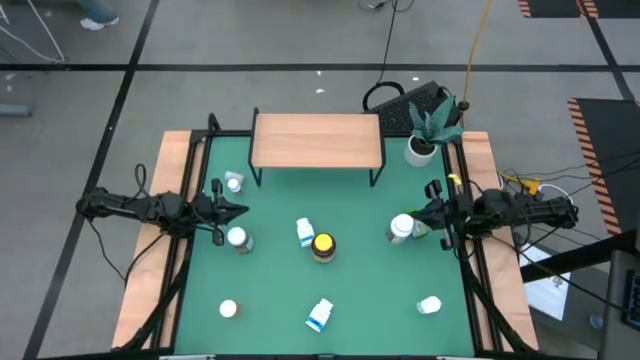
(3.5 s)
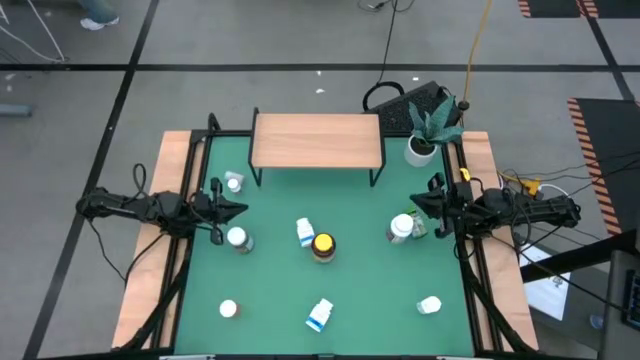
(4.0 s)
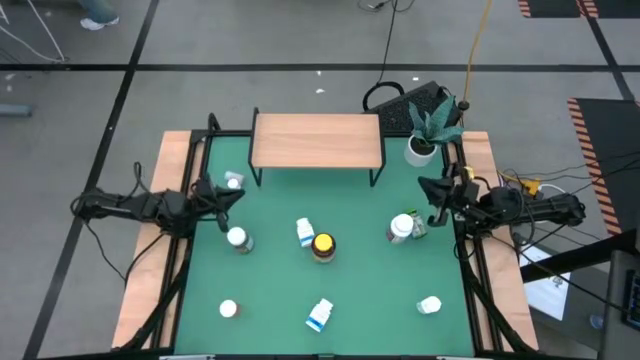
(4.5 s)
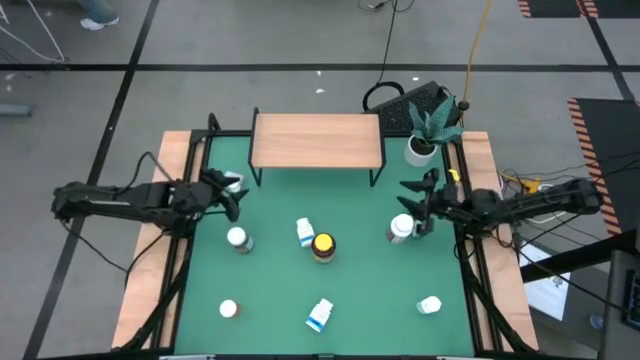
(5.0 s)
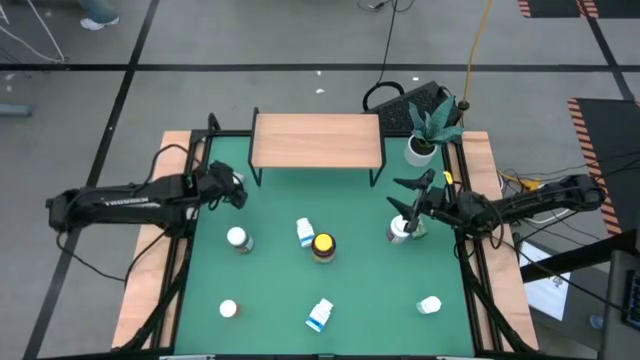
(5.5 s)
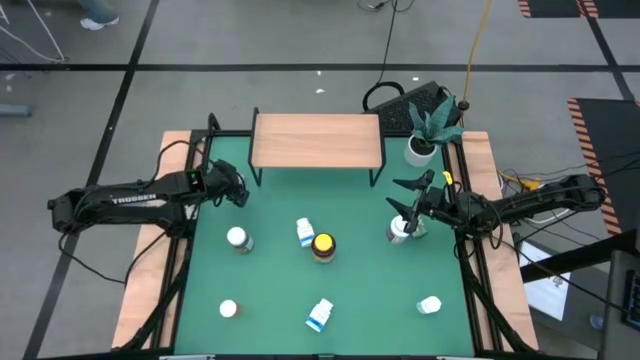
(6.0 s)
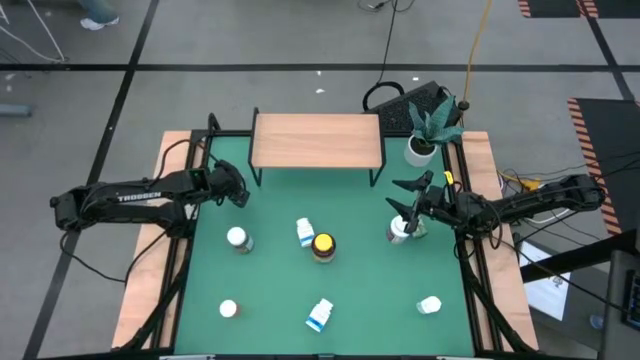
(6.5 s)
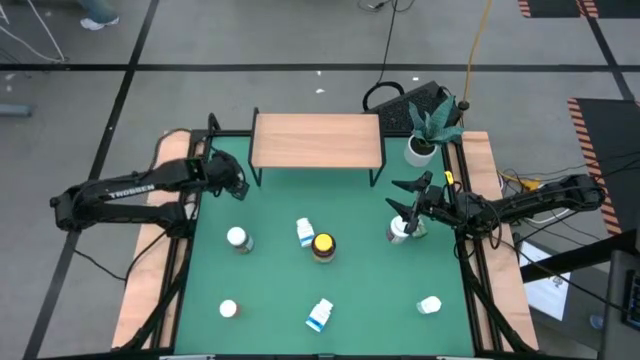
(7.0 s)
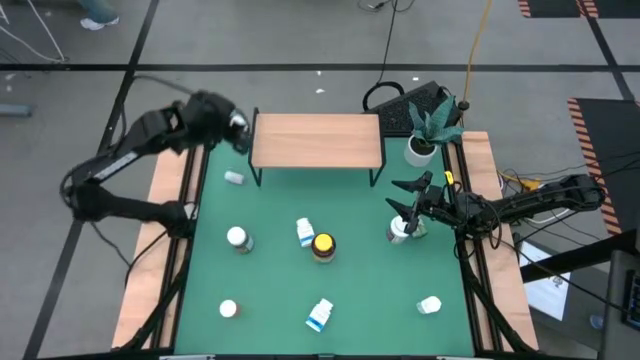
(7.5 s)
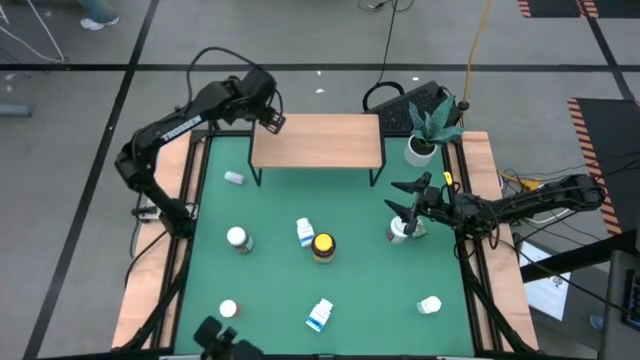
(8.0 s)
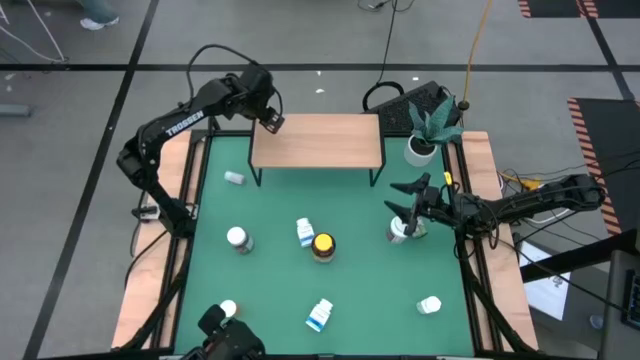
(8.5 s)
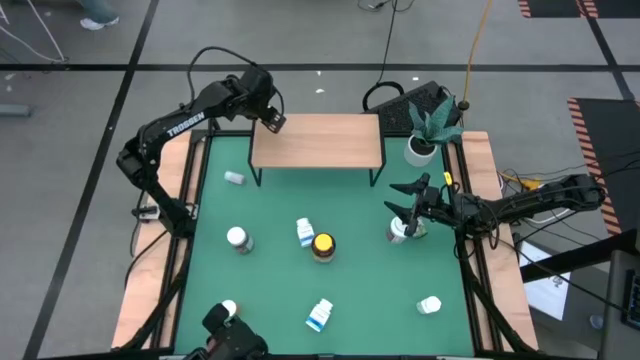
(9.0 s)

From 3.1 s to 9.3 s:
Task: Pick and place medicine bottles onto shelf by color
Put the small white medicine bottle on the shelf

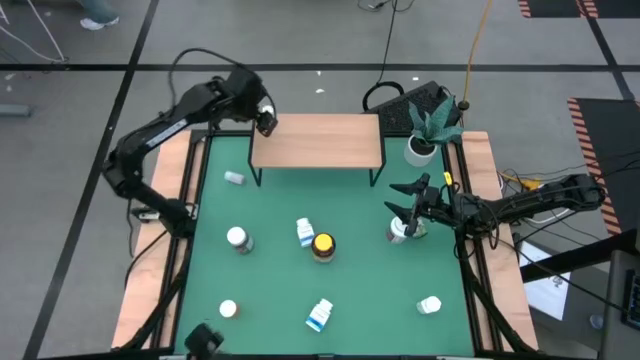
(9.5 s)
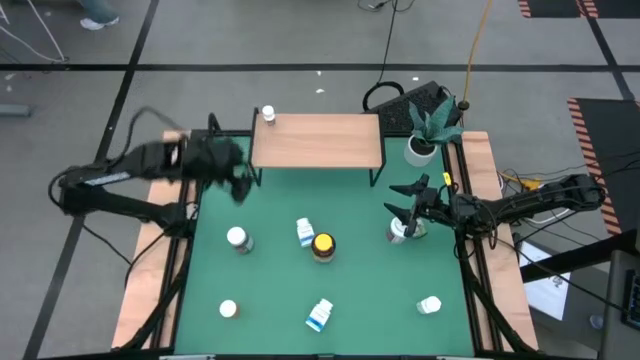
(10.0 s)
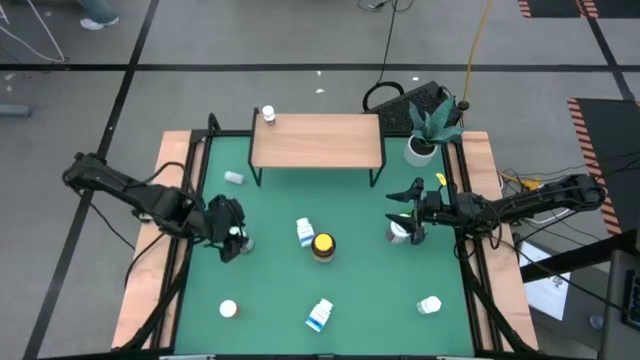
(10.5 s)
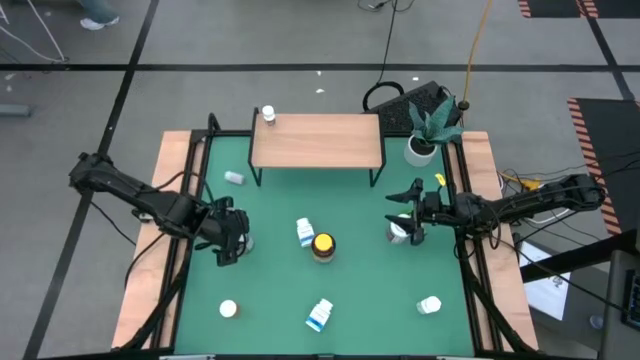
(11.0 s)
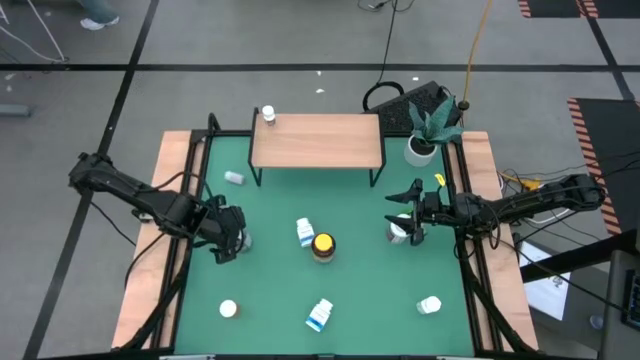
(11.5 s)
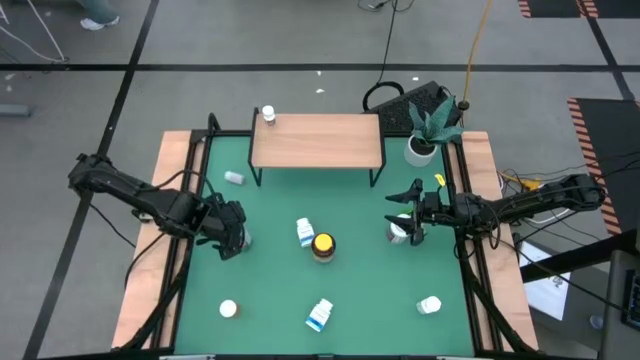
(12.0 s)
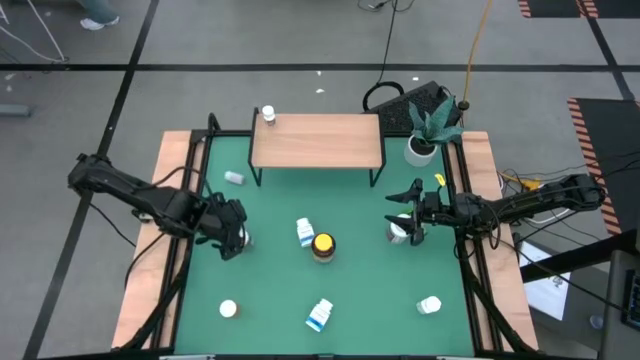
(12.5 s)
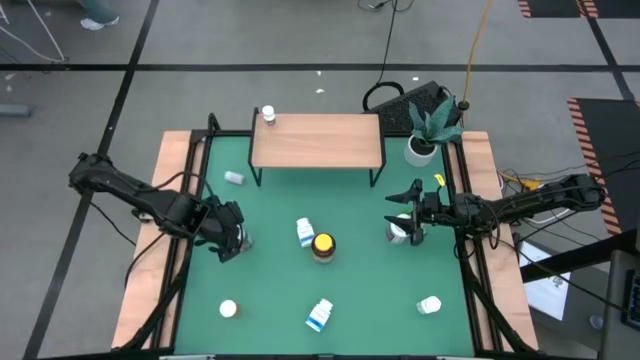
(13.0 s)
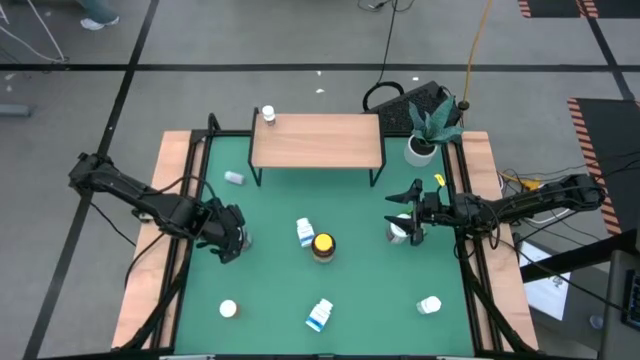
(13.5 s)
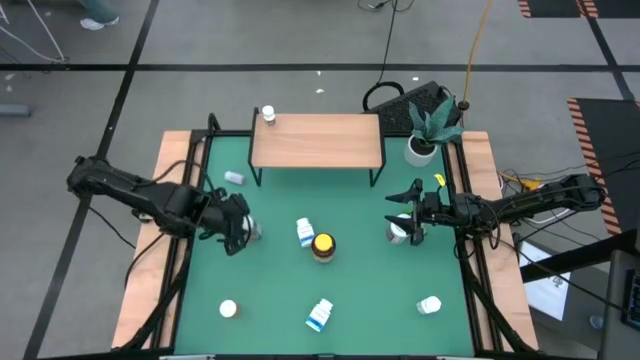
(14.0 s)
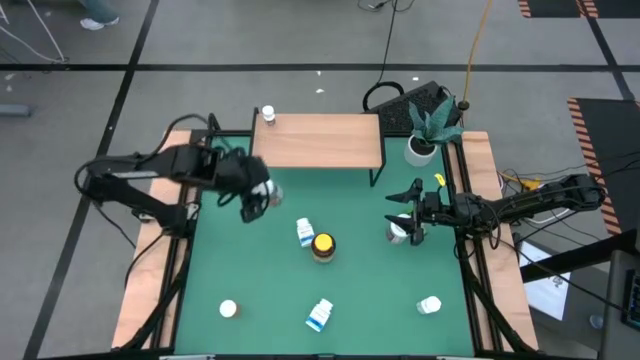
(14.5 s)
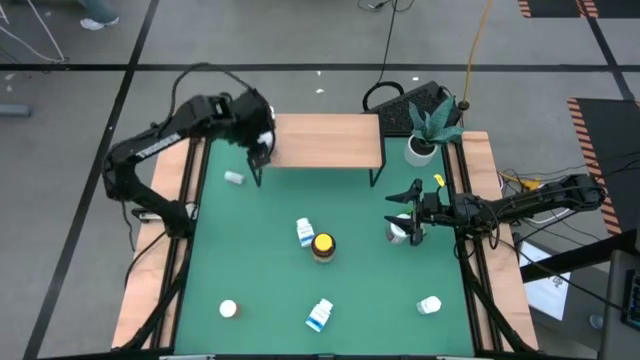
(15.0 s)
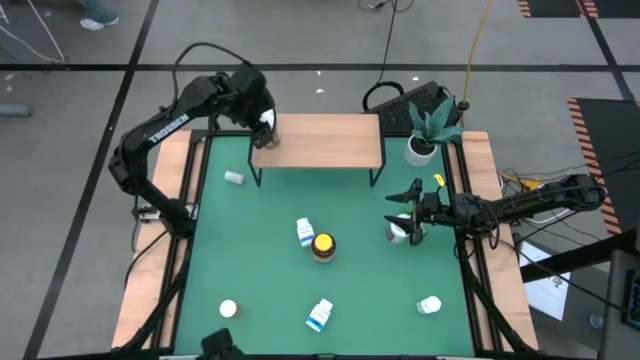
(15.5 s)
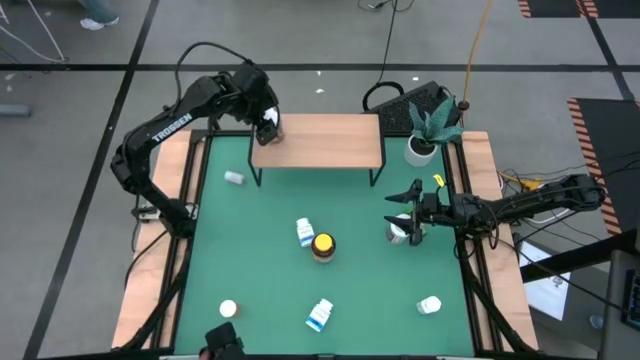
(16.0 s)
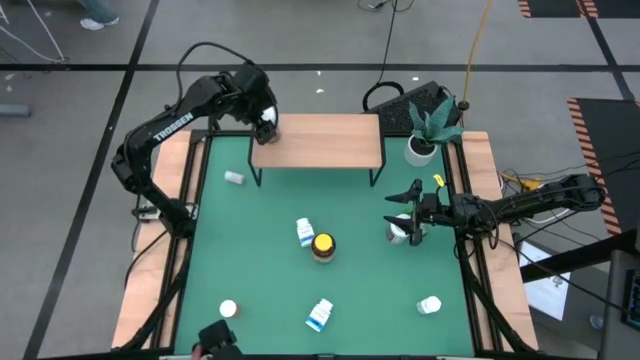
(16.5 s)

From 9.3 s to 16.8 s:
Put the left green medicine bottle on the shelf

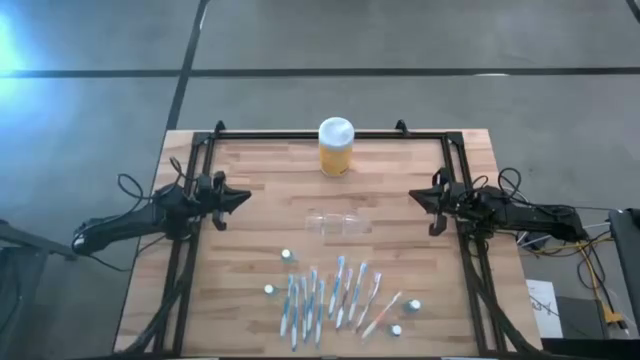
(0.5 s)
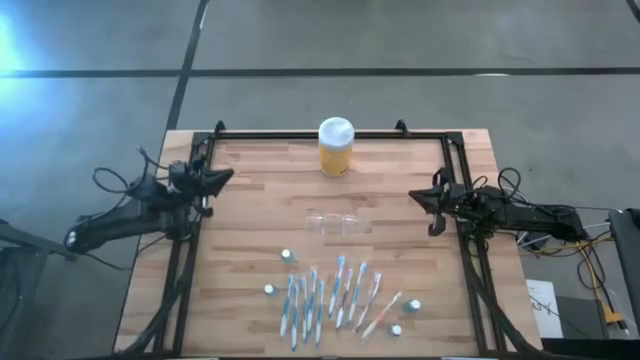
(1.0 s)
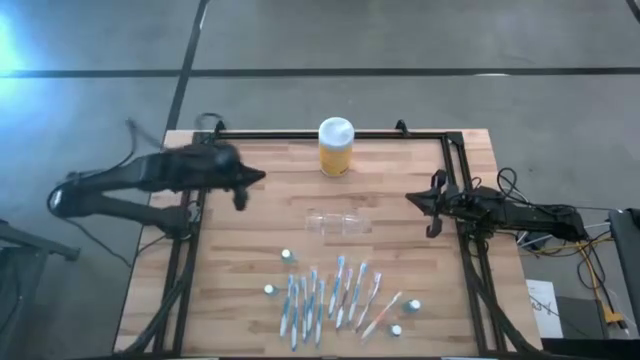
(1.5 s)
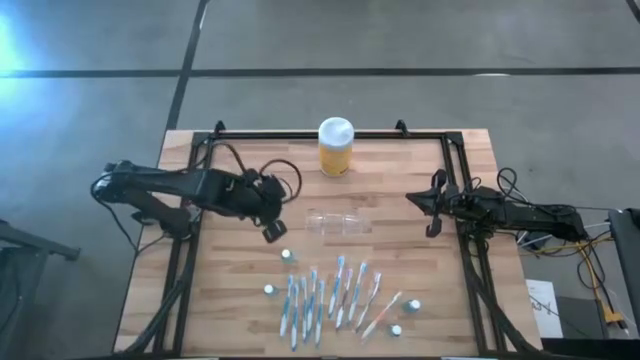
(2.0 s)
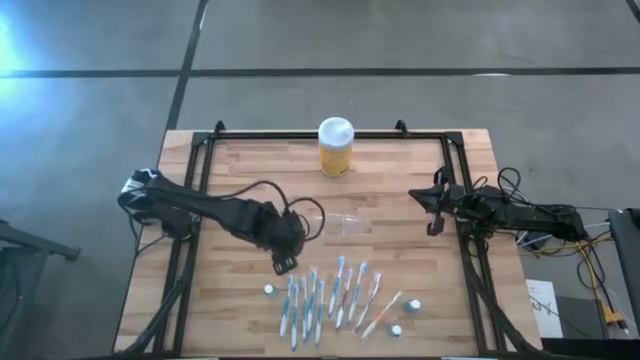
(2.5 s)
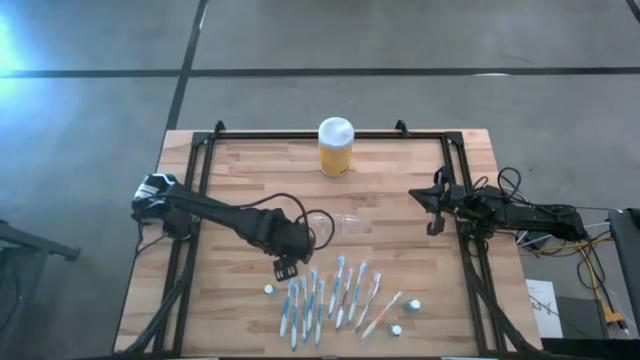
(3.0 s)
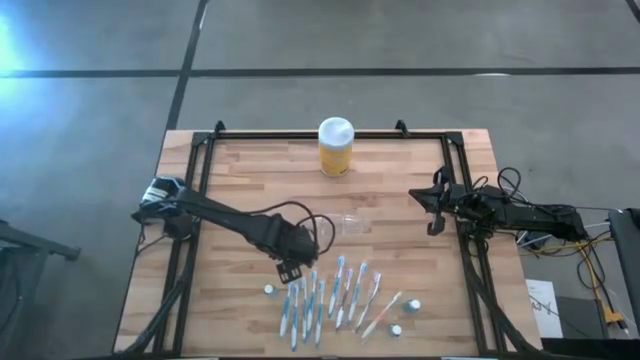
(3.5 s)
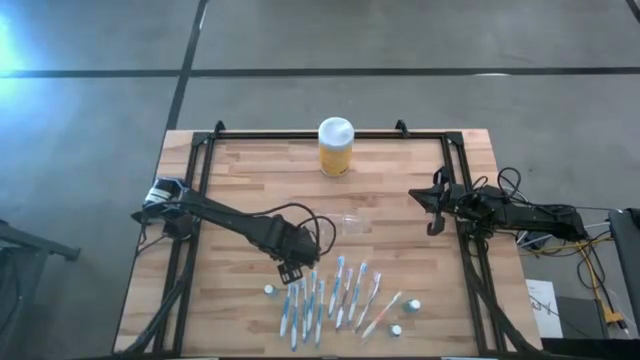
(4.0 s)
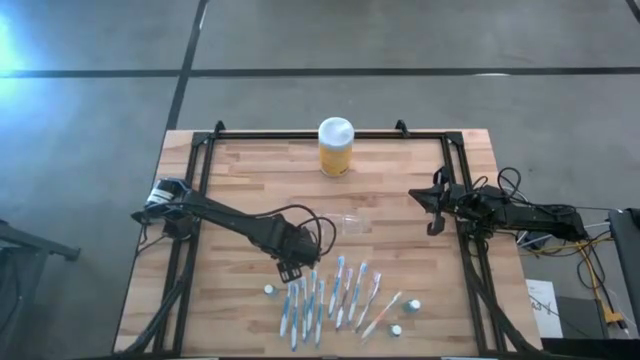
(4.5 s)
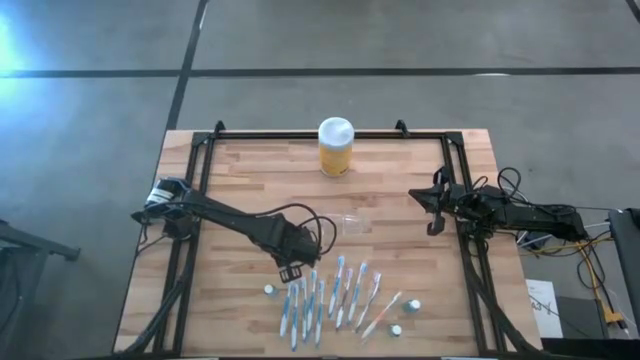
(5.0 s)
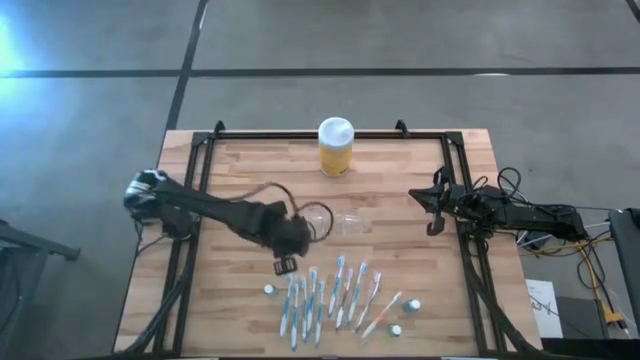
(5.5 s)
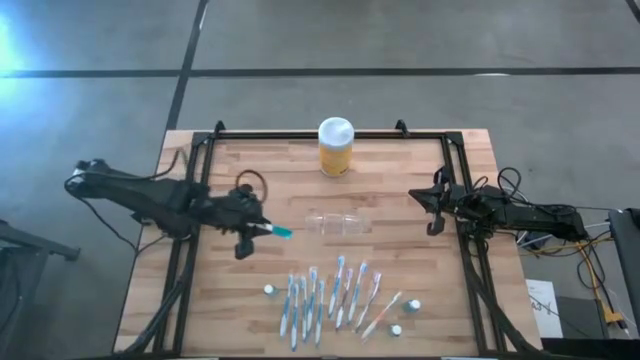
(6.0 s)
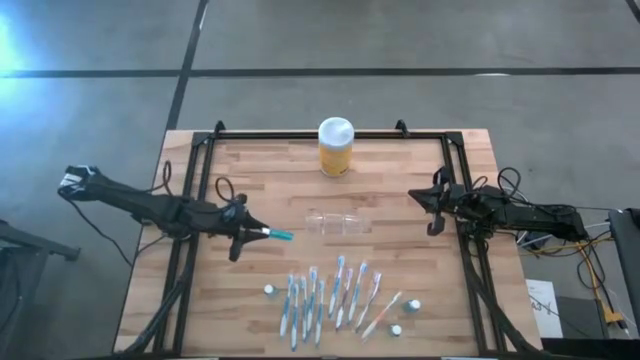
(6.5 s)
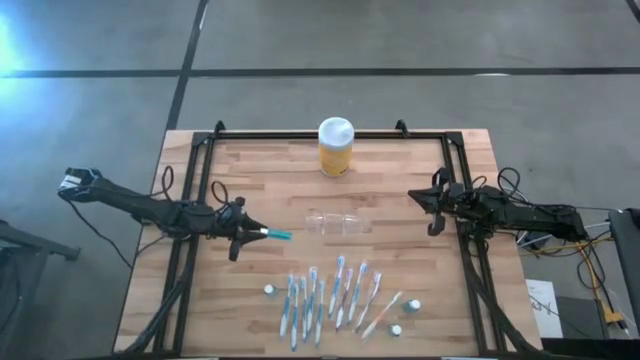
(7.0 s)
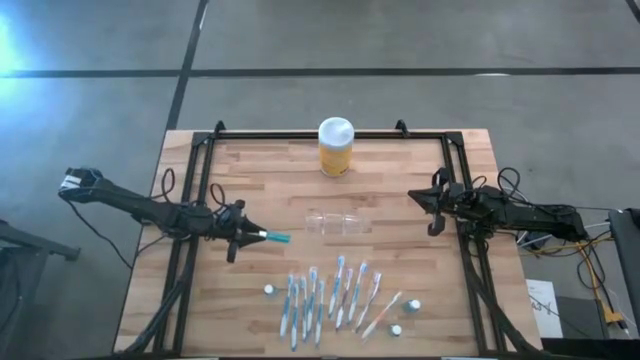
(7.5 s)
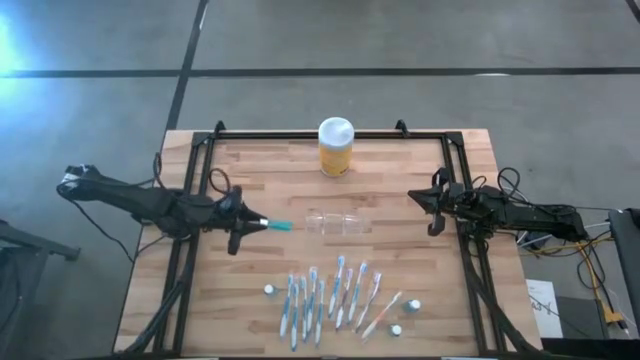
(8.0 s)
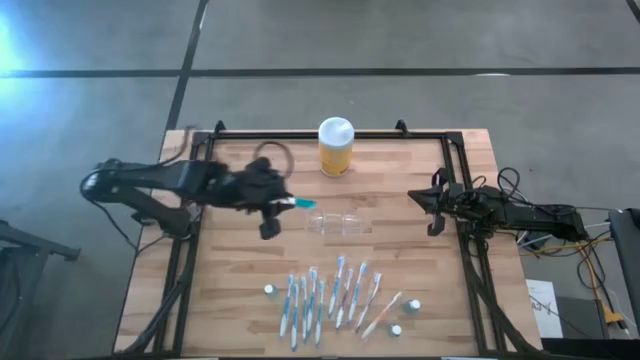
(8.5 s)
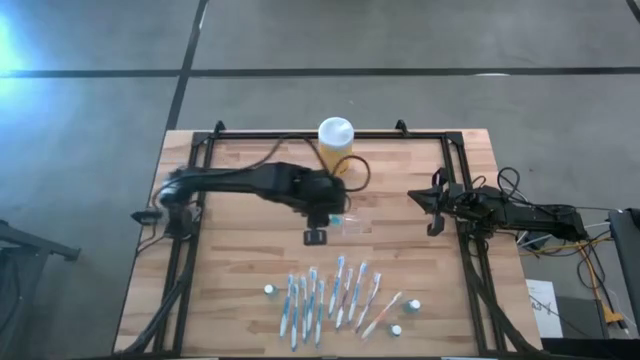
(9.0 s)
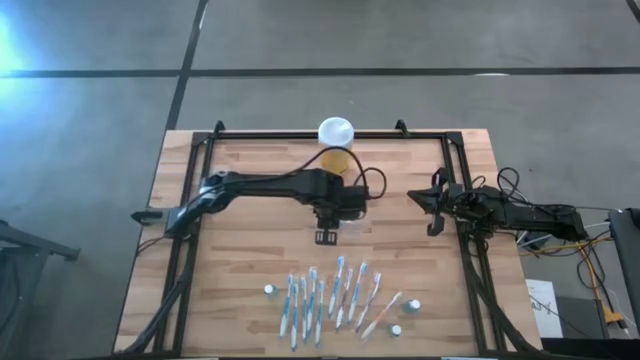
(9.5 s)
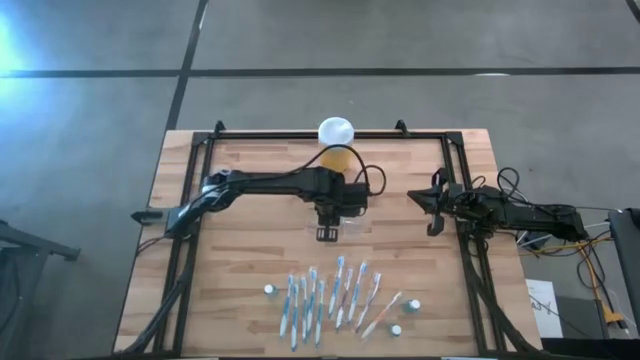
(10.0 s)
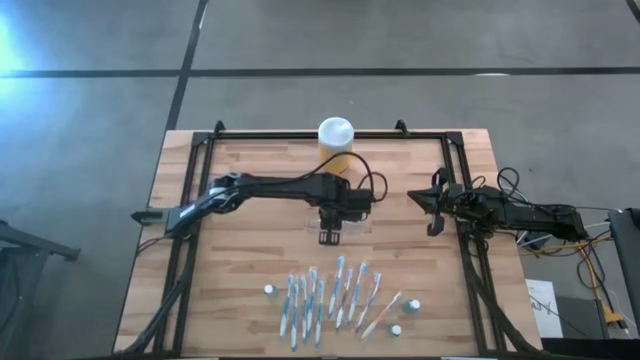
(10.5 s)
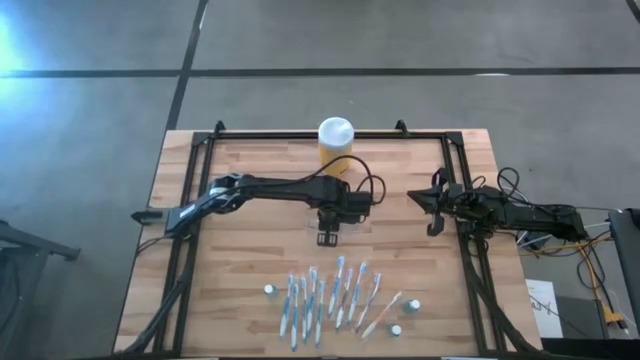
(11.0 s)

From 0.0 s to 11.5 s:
Task: Pick & Place toothbrushing station
Put the blue mouthwash into the transparent organizer
